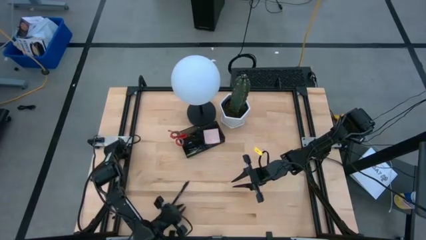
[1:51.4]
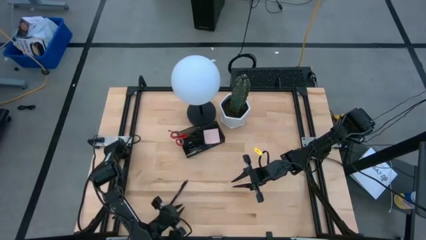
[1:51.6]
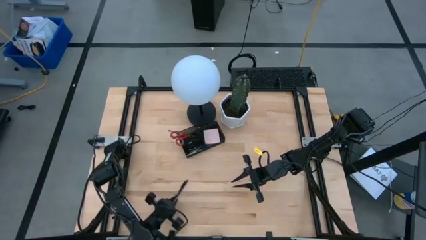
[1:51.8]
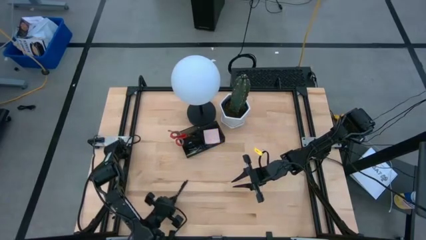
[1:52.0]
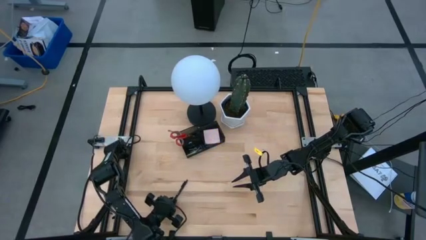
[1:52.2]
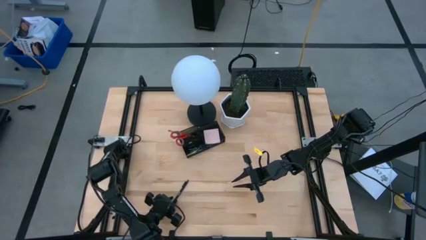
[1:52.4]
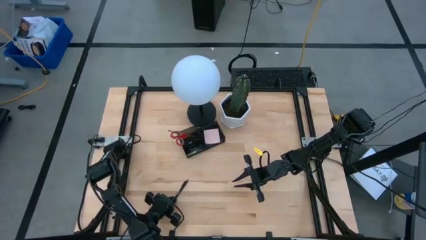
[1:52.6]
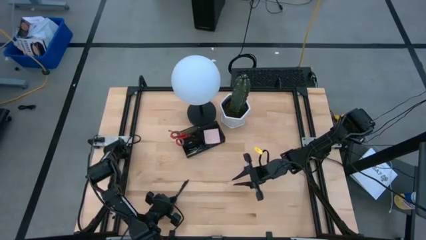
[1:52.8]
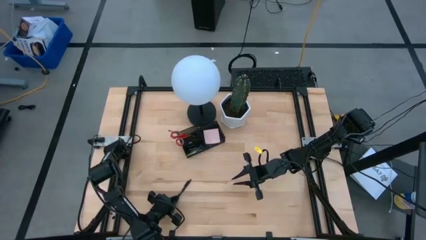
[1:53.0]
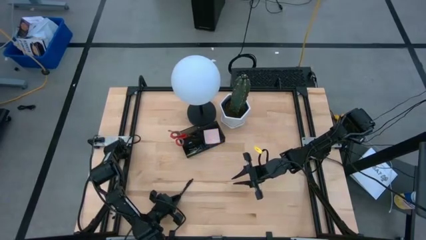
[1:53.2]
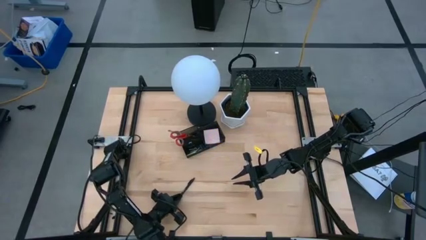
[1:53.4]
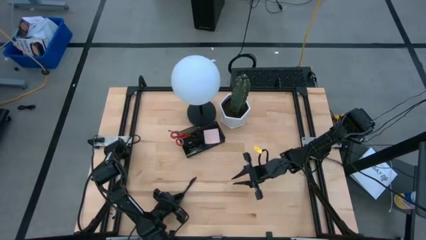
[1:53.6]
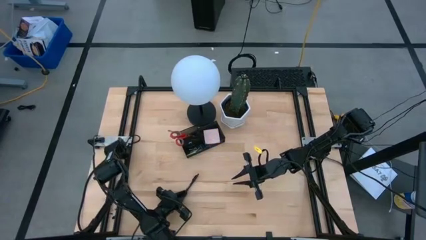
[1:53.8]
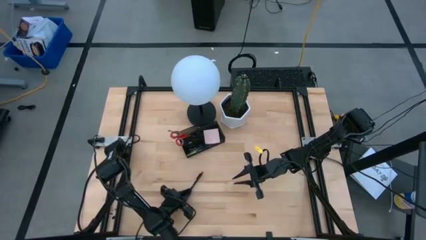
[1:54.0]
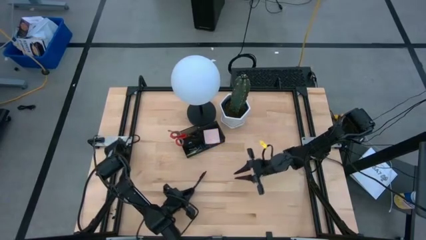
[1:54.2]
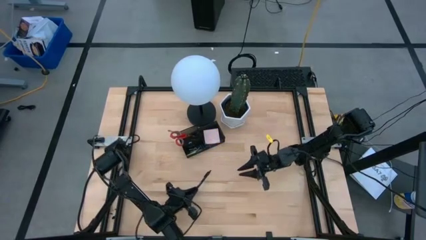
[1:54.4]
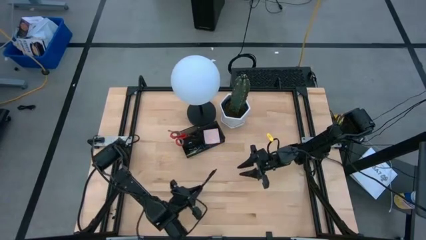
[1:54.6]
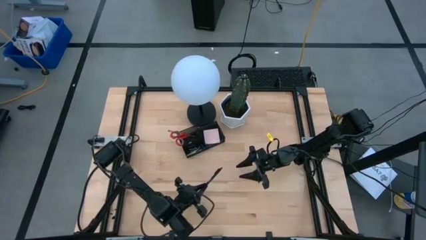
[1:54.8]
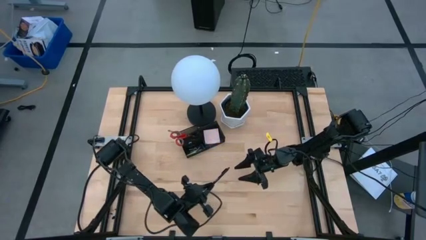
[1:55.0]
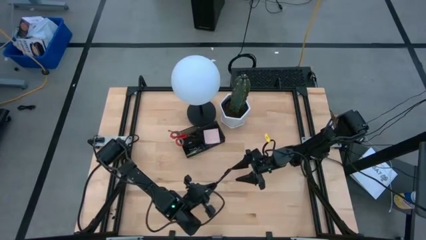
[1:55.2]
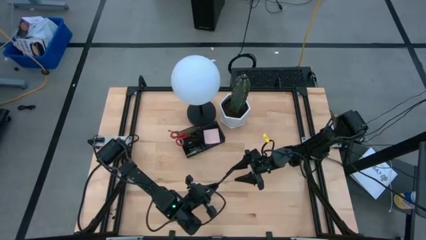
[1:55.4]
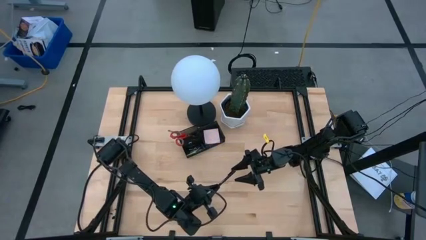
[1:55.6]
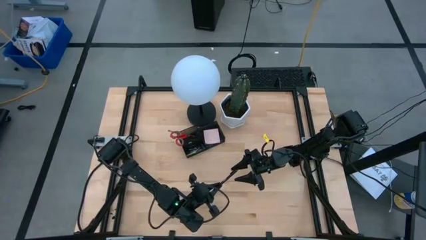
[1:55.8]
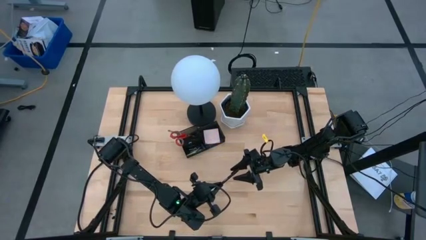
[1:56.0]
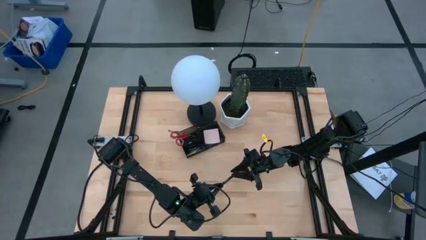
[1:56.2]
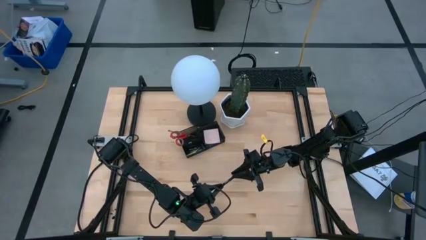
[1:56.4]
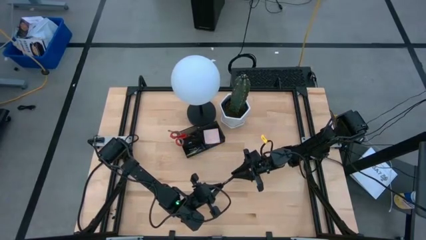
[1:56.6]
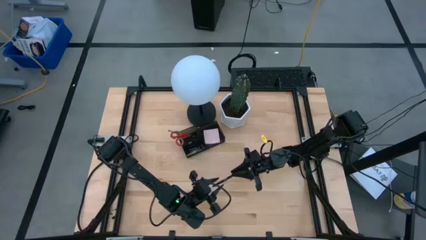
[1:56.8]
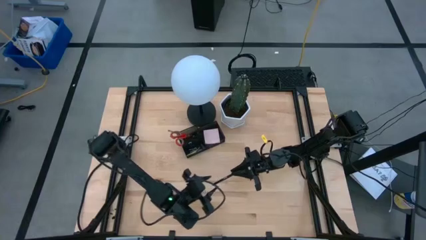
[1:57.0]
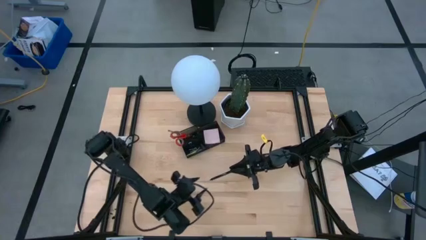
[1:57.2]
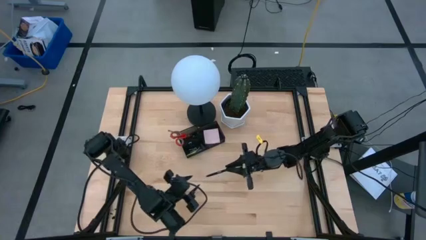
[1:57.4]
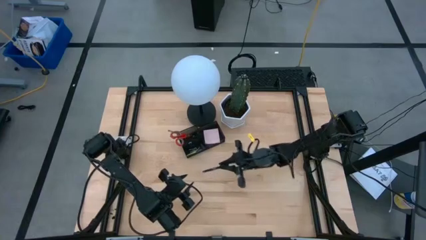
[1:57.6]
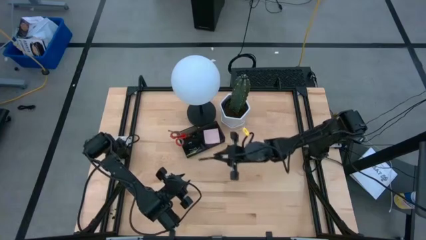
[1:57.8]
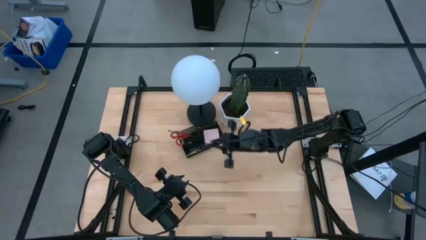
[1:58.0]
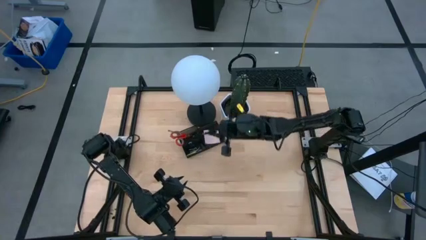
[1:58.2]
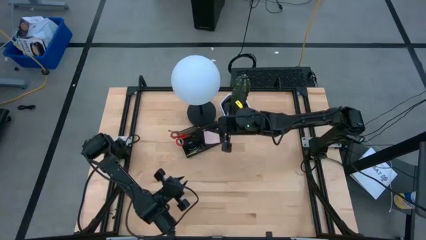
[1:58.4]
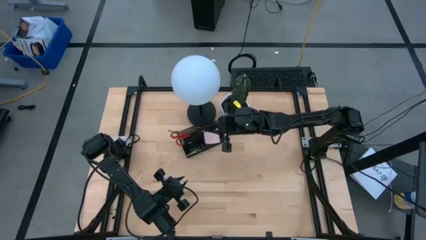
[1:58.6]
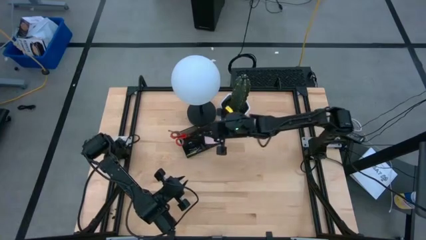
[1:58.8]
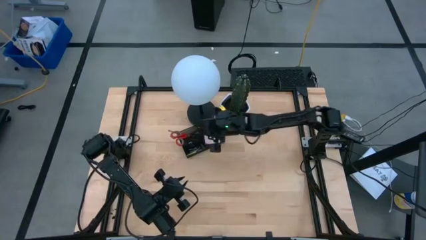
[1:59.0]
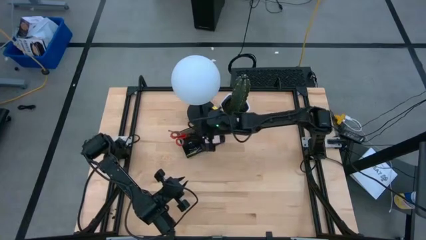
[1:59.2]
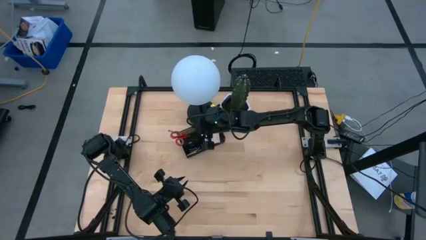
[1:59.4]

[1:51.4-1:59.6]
Task: Pick and place office supplies into organizer
Put the black pen into the desk organizer

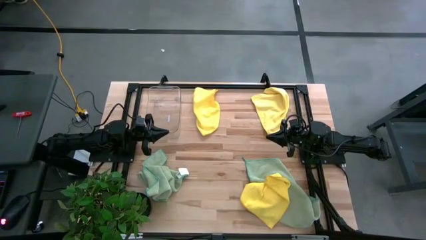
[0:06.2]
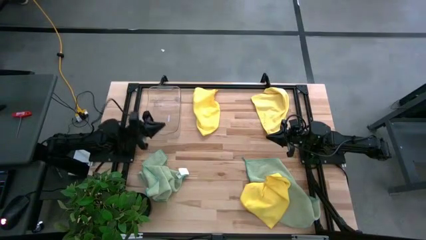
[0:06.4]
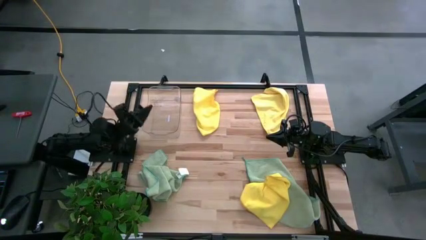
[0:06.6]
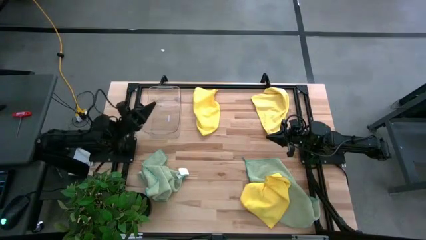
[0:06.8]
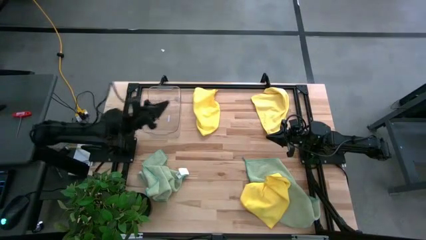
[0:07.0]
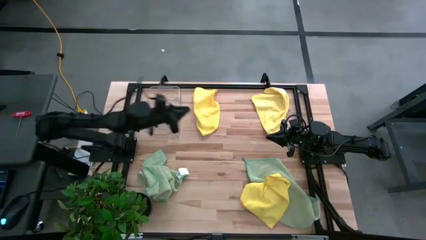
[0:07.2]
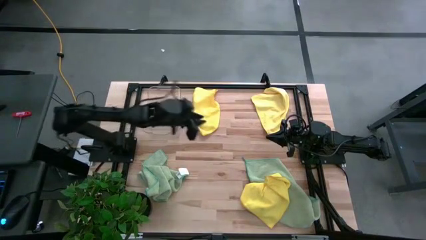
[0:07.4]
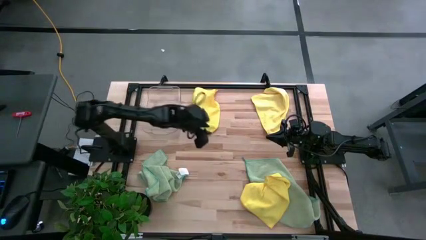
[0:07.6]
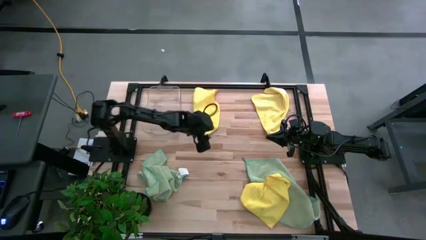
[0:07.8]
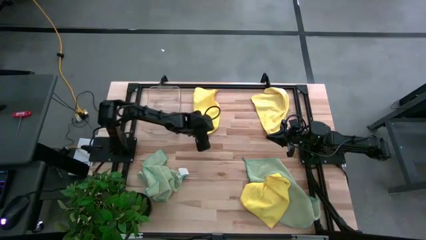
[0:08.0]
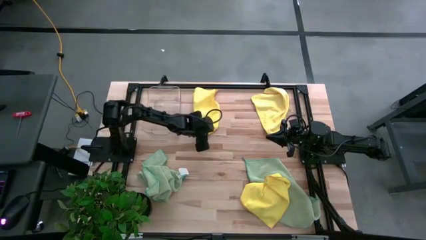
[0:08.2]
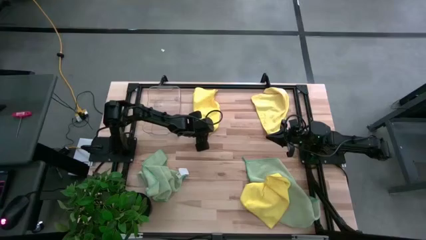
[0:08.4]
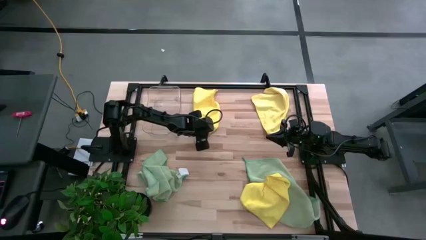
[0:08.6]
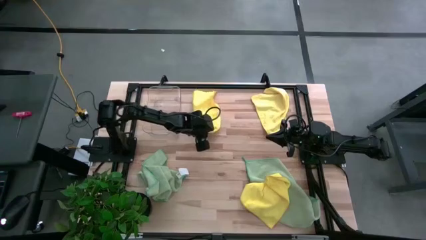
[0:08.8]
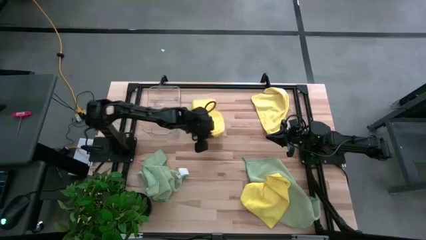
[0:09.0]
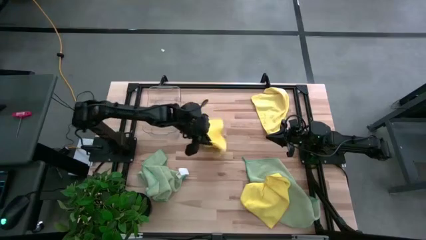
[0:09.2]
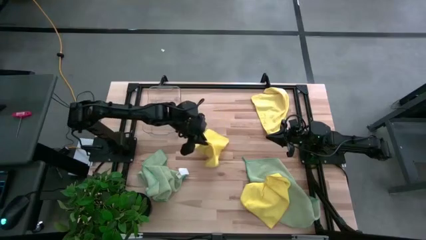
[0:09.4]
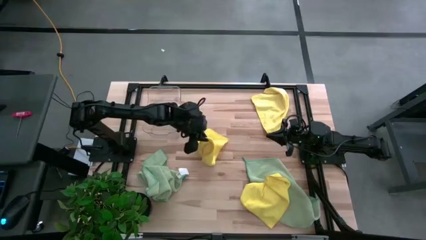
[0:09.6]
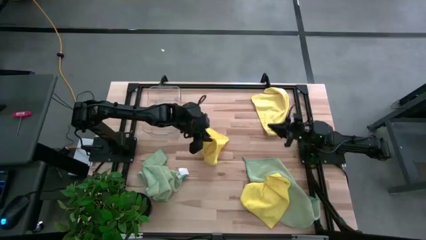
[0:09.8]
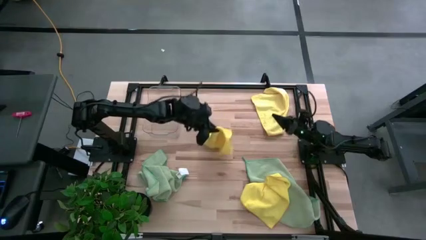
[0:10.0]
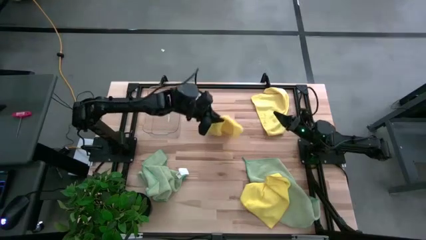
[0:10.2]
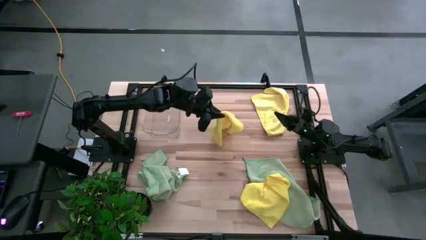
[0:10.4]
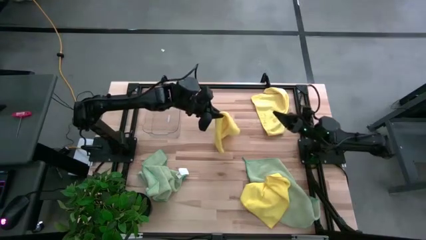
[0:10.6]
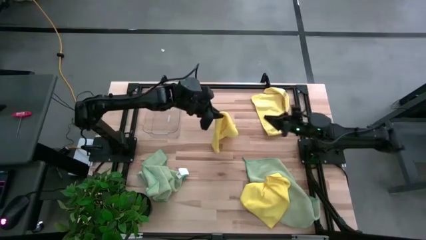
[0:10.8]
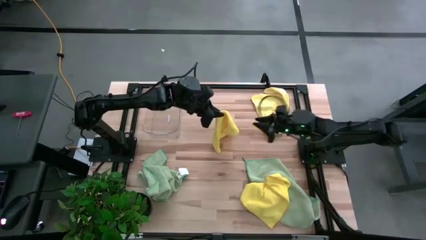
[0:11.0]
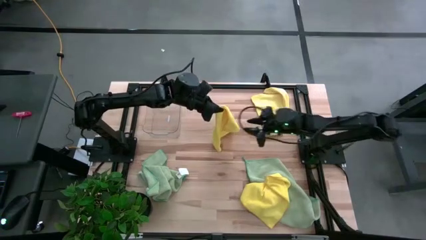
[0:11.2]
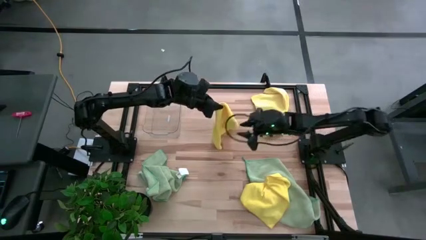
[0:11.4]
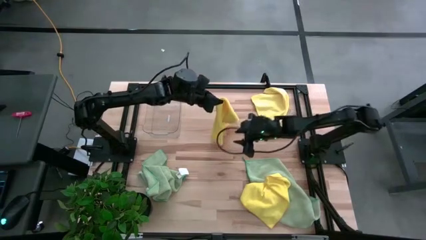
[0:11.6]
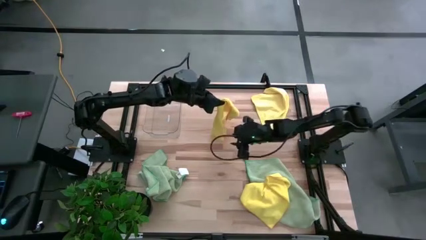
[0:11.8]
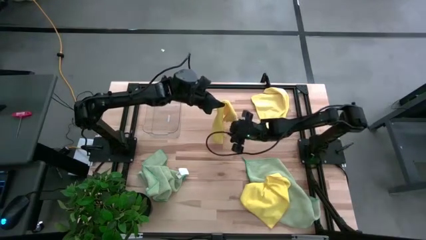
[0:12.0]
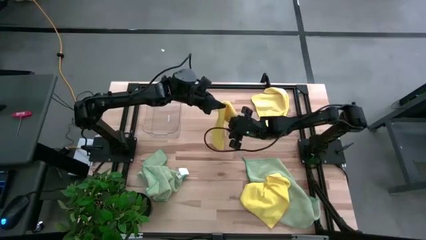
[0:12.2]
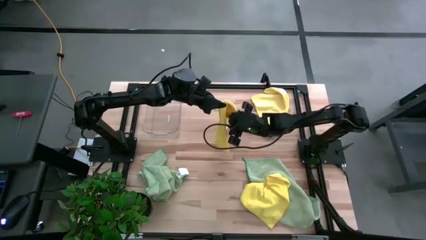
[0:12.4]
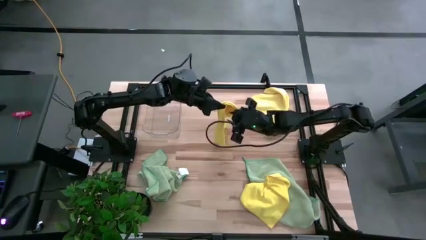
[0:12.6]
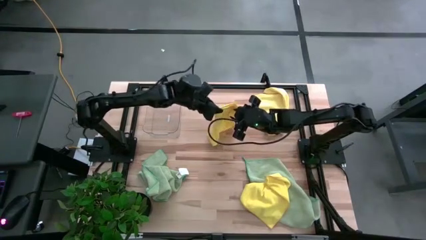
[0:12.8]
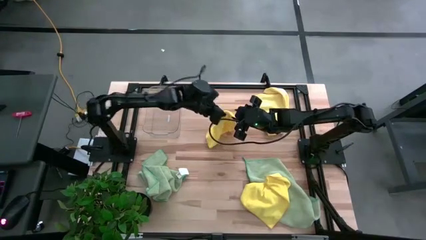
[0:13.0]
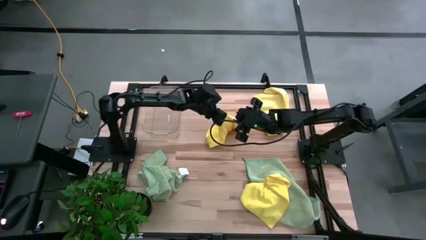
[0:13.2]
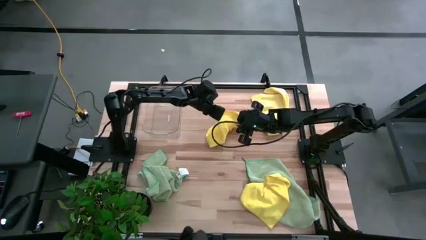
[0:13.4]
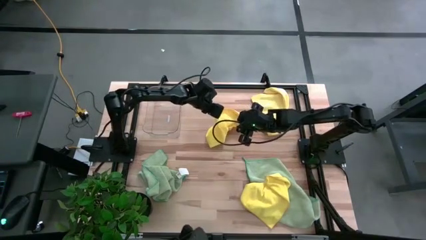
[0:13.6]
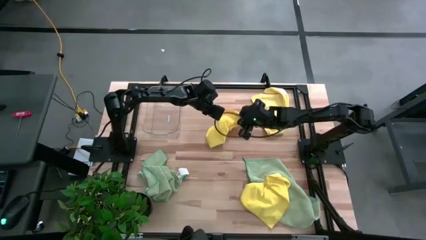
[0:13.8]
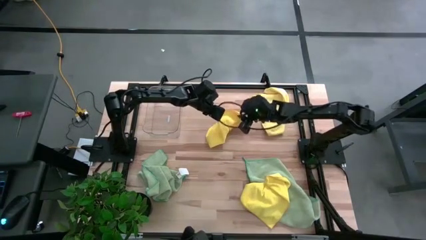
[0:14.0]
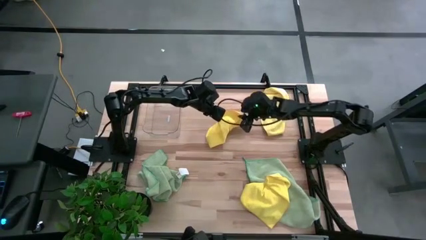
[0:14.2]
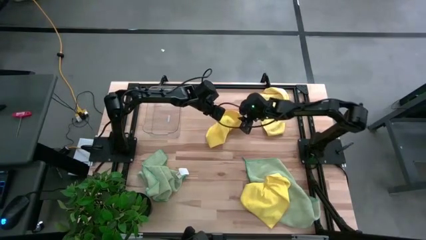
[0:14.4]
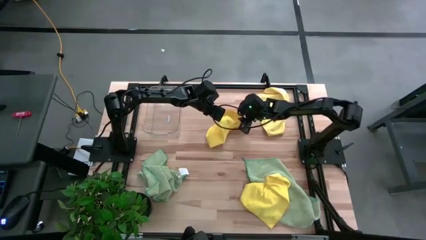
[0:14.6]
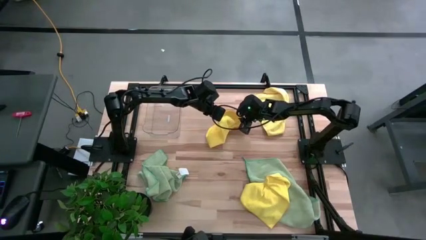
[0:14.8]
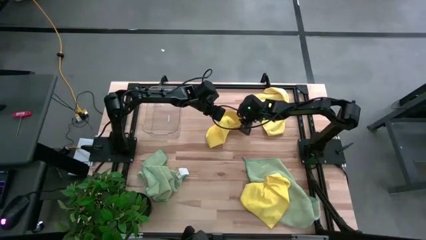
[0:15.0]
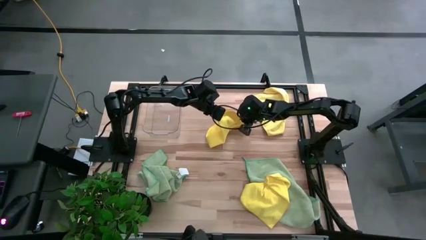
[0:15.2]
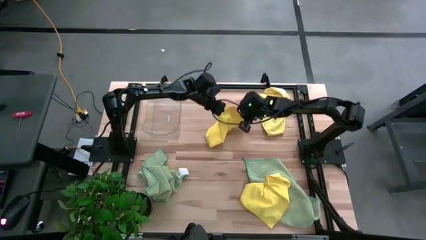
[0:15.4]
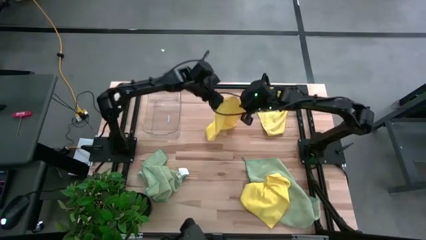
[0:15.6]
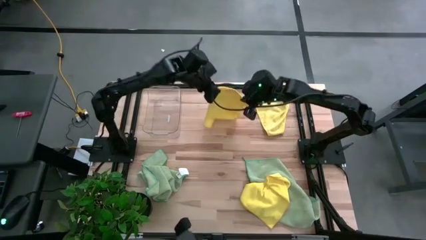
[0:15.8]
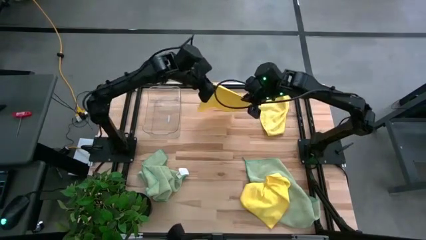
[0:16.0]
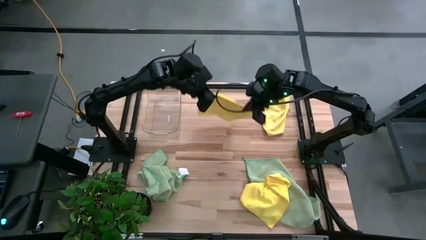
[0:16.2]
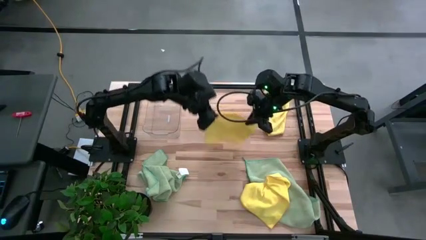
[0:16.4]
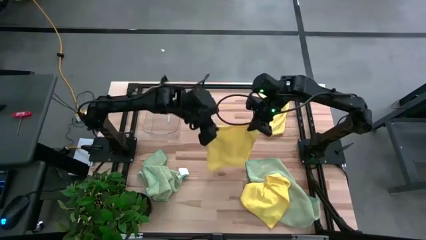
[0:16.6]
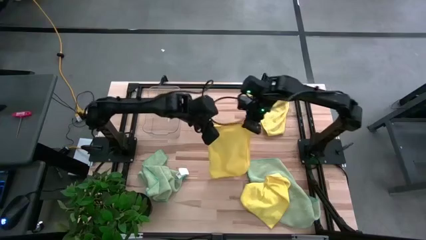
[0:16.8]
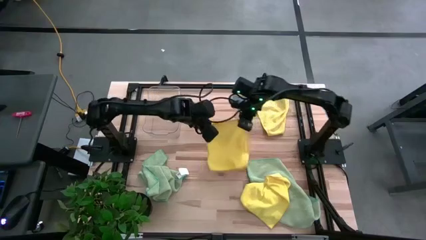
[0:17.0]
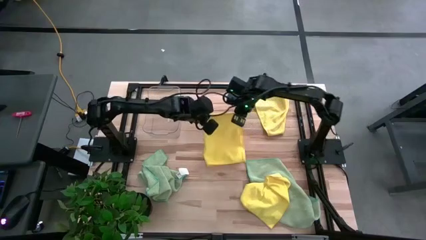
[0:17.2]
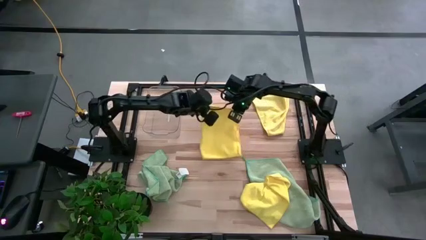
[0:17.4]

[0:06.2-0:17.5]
Task: Fold microfiber towels
Fold the top left yellow towel
